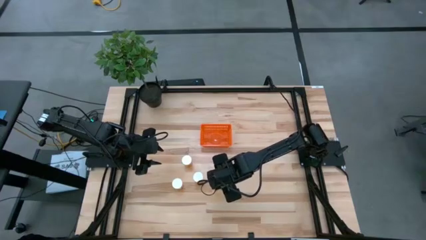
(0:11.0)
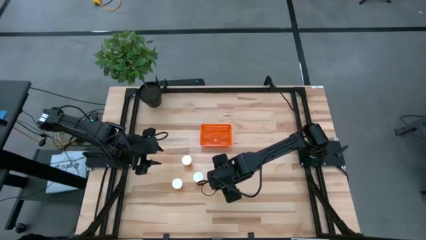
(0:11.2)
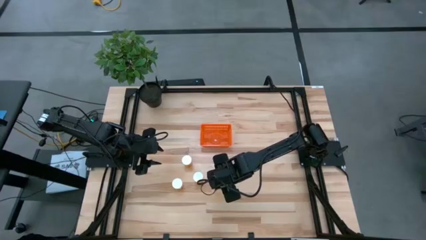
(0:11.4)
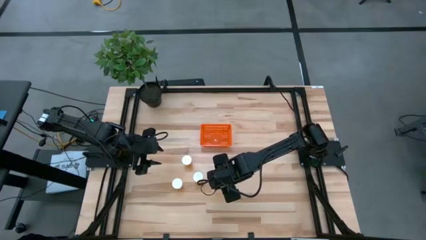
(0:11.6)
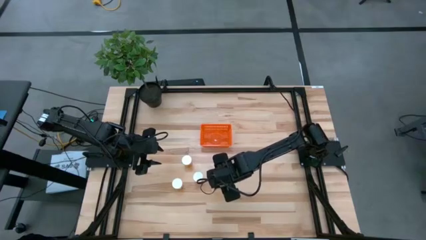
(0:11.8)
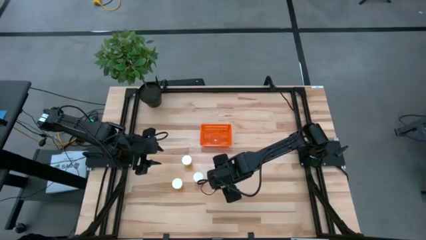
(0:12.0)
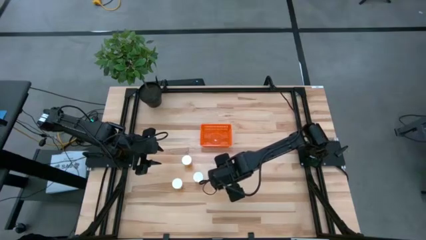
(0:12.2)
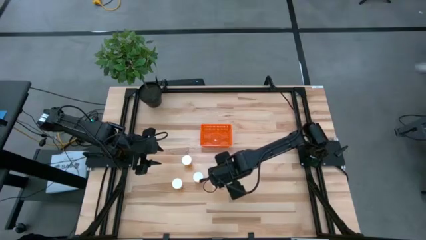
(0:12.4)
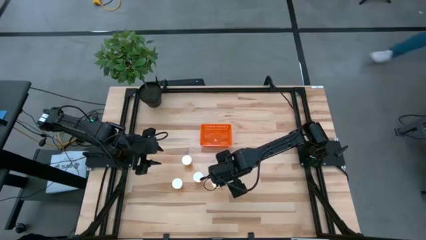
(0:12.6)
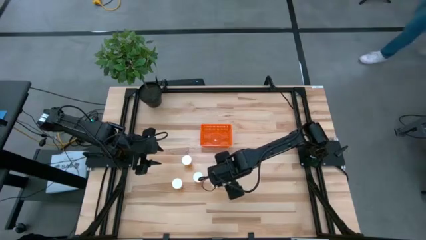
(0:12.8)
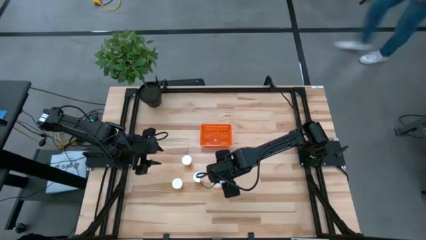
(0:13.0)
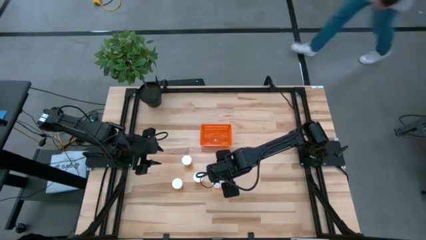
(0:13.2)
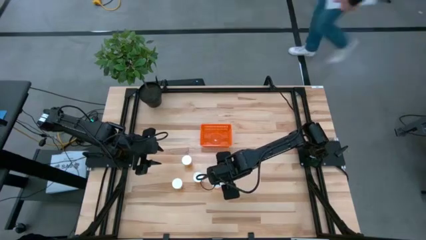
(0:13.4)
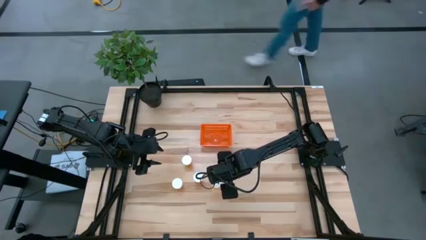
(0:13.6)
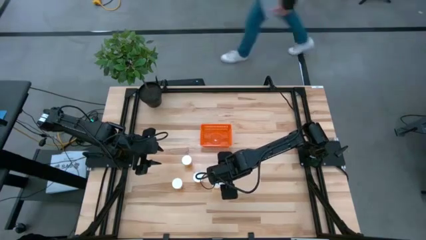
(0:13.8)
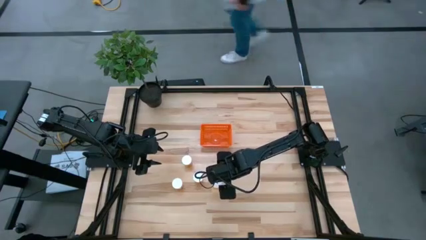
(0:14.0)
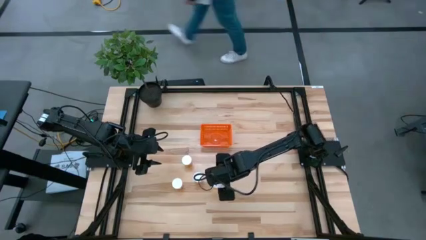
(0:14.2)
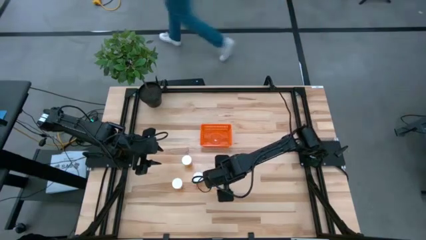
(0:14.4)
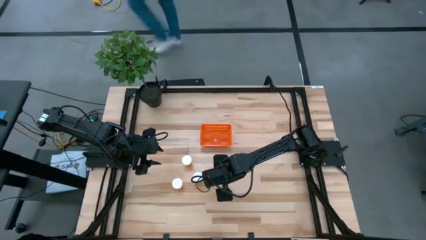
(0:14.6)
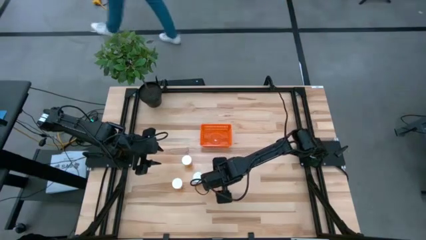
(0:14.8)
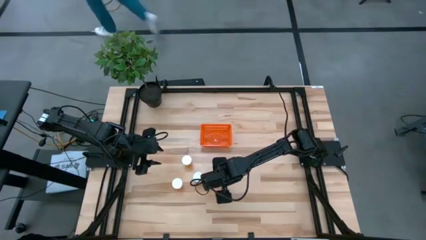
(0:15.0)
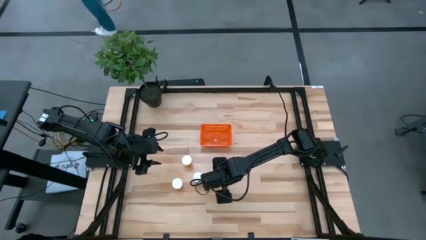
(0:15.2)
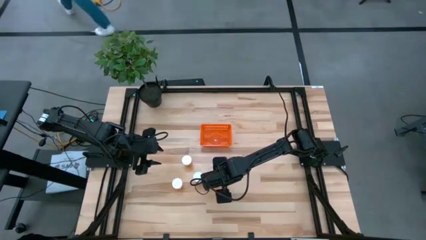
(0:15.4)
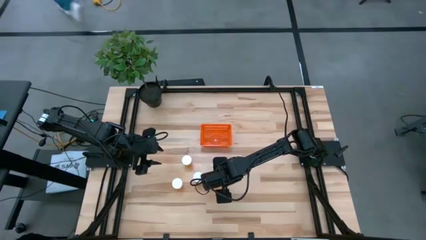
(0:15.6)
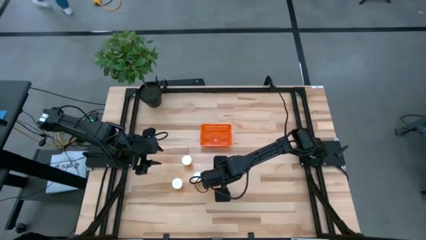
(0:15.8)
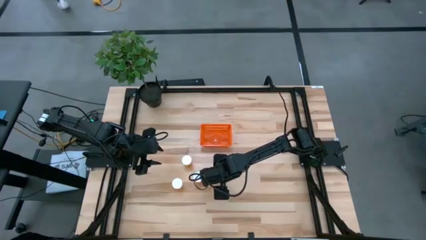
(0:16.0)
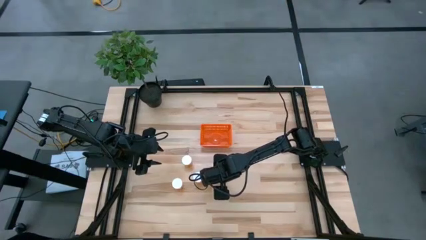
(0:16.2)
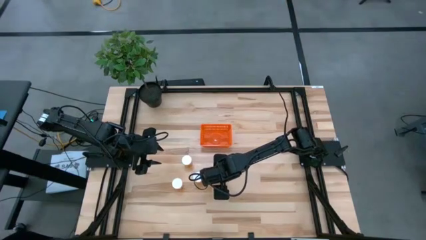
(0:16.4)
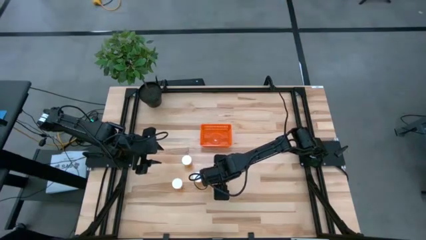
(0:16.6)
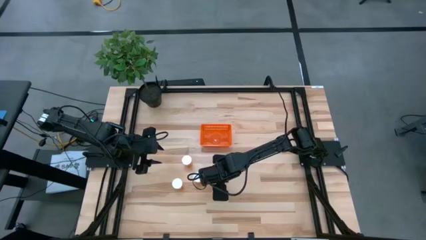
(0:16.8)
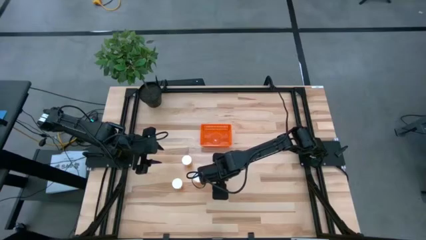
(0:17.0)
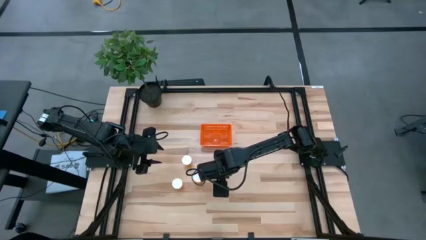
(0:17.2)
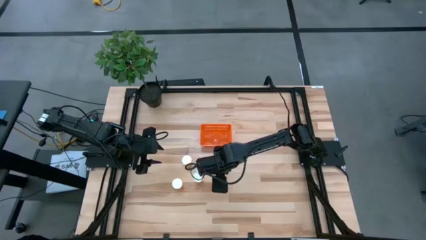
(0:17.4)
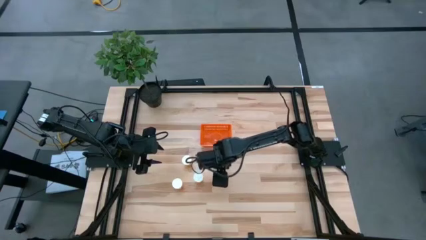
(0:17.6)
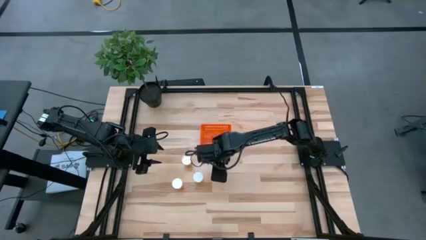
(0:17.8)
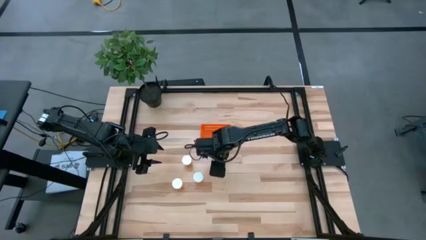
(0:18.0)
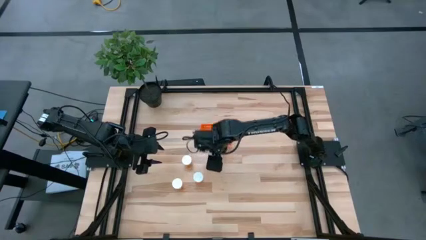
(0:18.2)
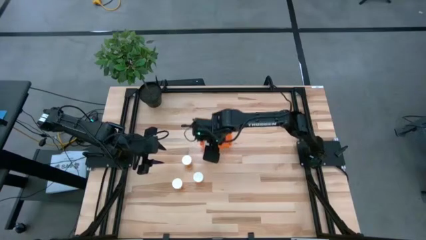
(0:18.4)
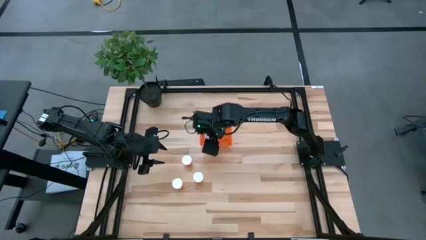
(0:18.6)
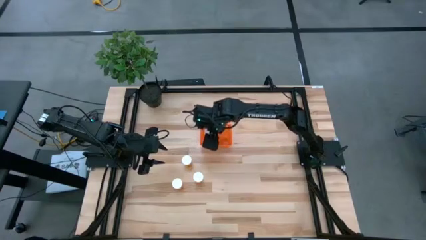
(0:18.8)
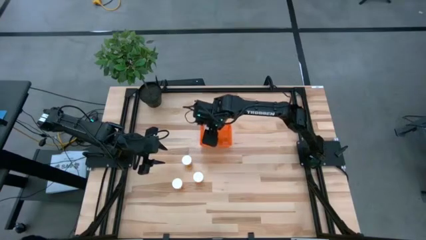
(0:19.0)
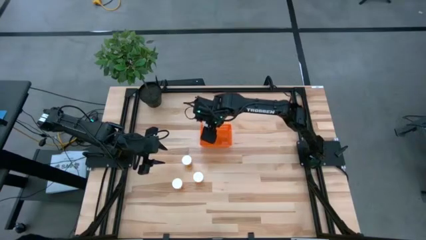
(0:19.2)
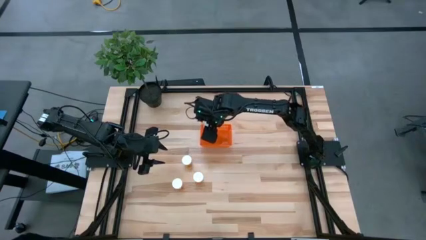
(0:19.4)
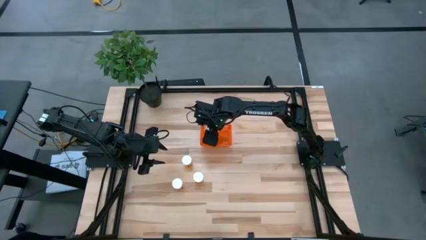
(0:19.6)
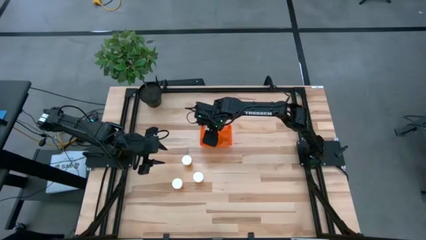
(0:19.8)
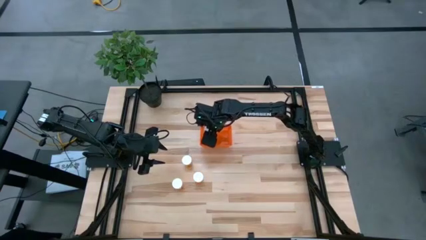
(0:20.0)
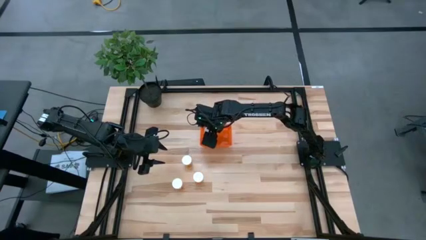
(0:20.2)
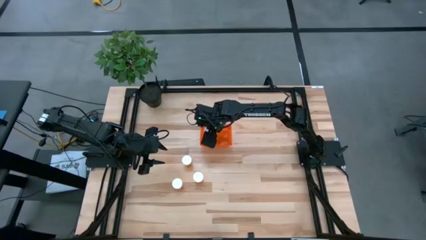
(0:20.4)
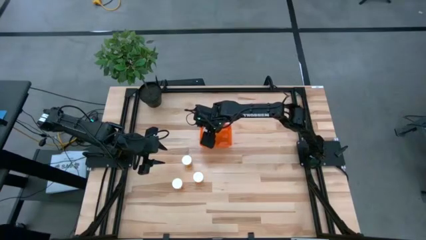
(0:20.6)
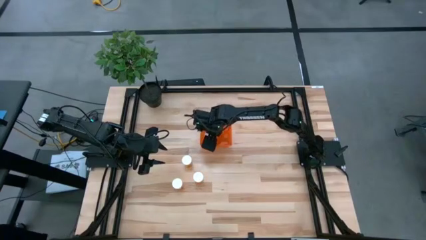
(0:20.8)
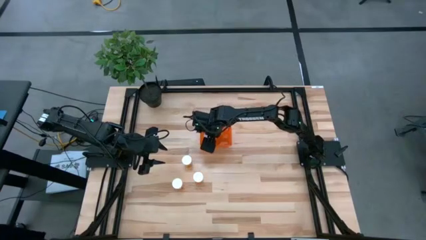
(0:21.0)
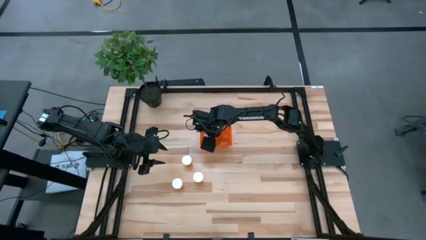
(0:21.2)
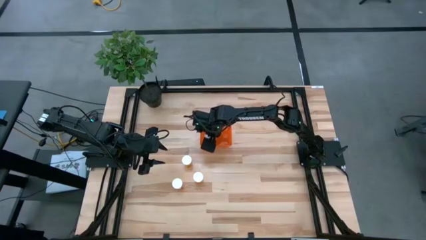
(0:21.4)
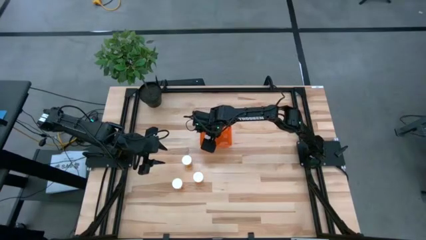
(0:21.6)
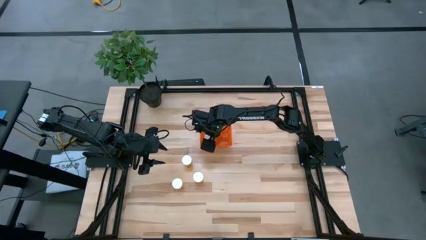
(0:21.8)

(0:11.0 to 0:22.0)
Task: Pick and place pill bottles into a basket
Put the orange pill bottle into the orange basket
